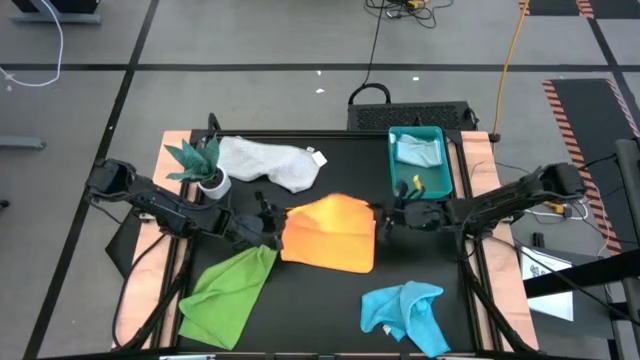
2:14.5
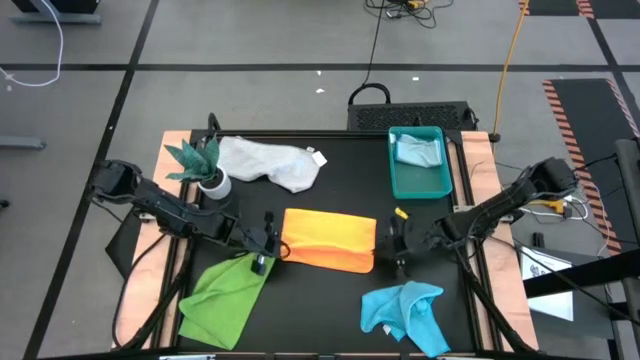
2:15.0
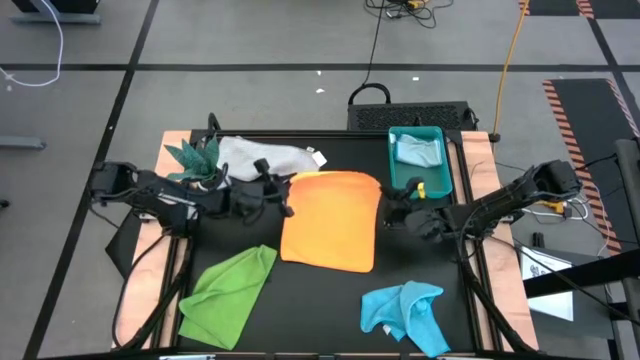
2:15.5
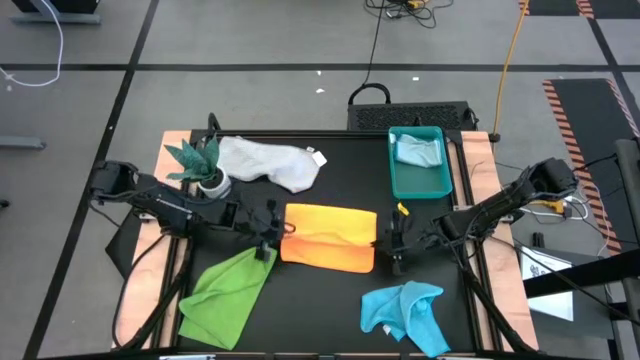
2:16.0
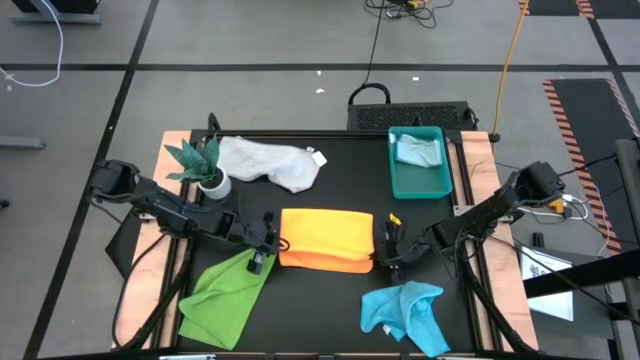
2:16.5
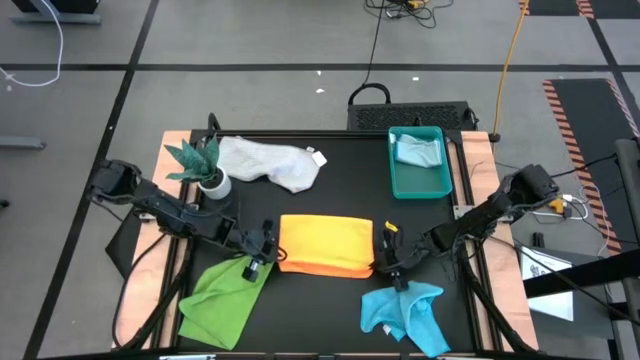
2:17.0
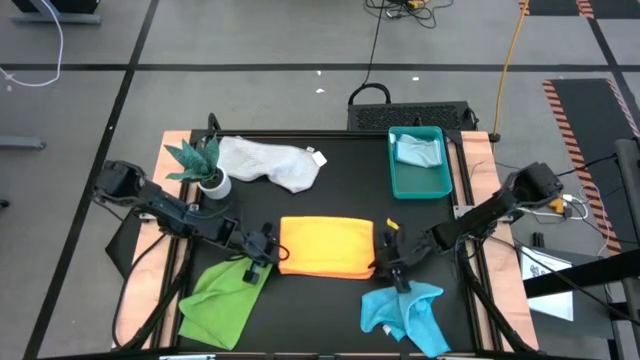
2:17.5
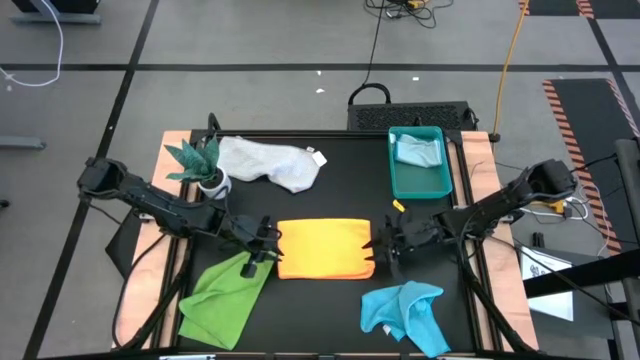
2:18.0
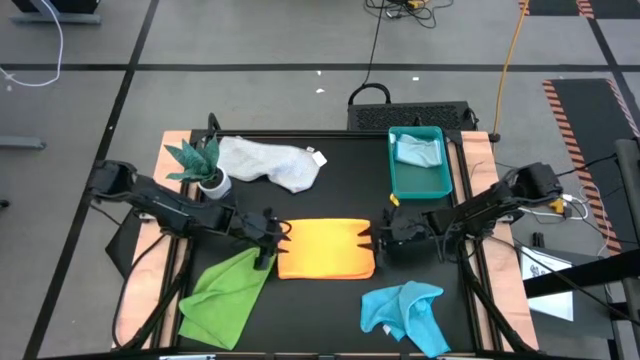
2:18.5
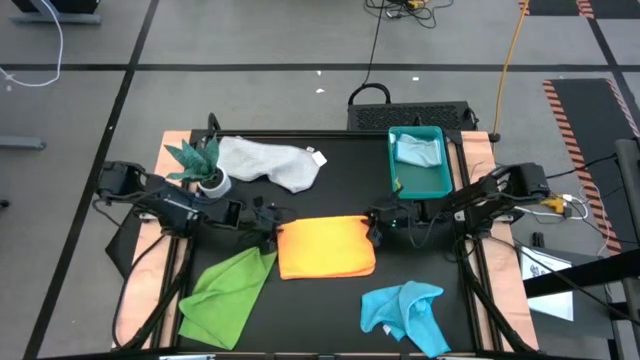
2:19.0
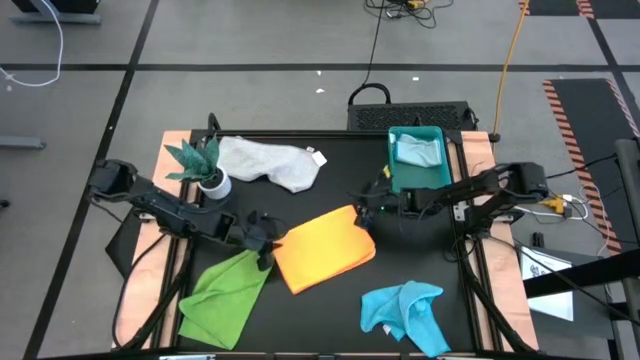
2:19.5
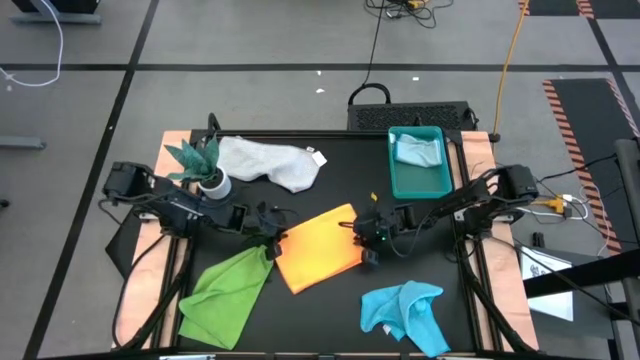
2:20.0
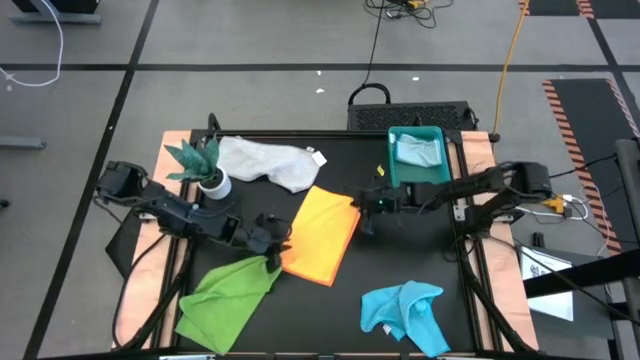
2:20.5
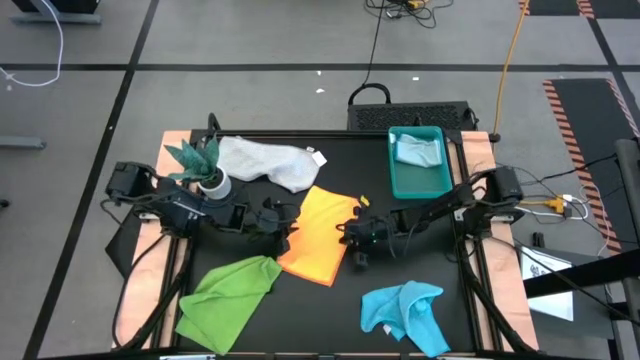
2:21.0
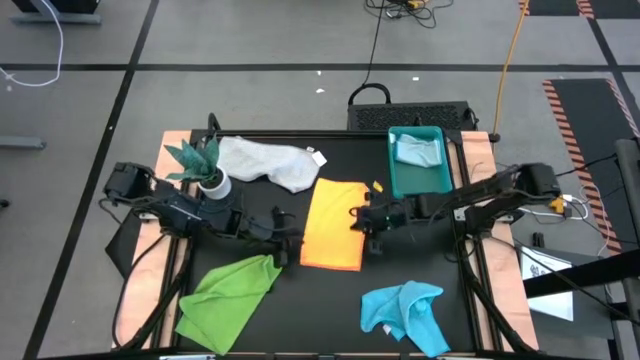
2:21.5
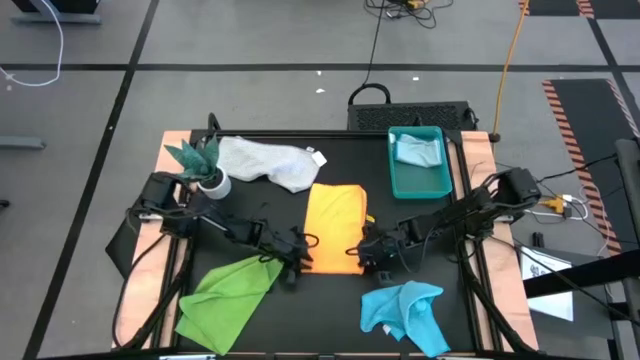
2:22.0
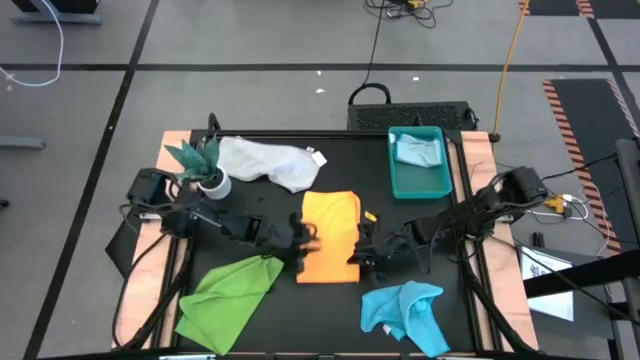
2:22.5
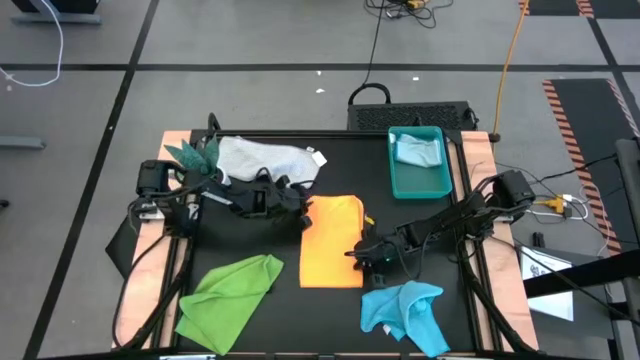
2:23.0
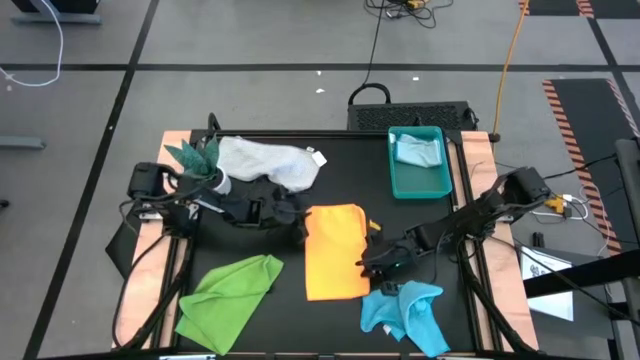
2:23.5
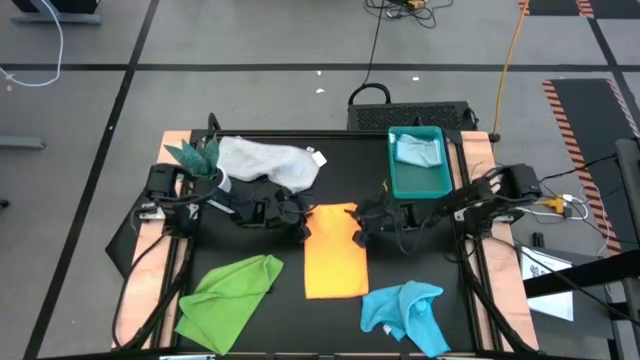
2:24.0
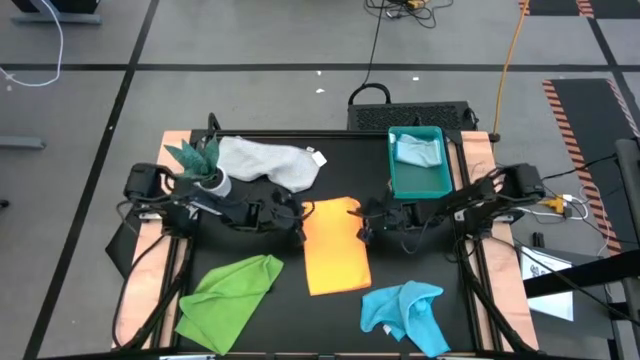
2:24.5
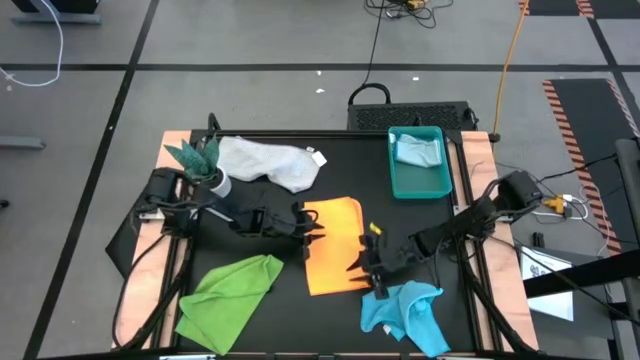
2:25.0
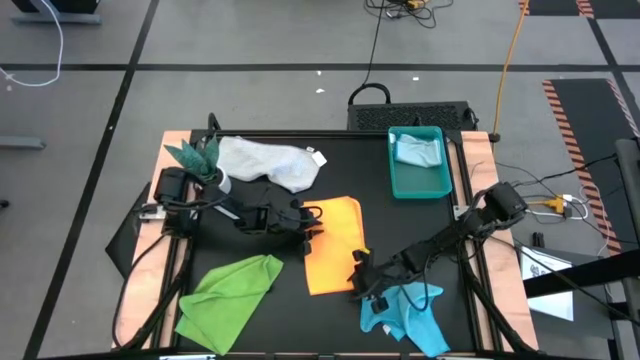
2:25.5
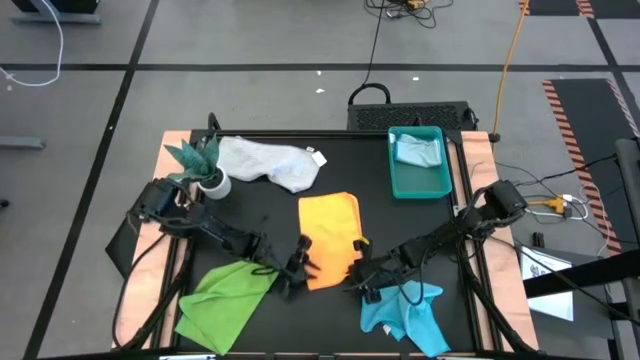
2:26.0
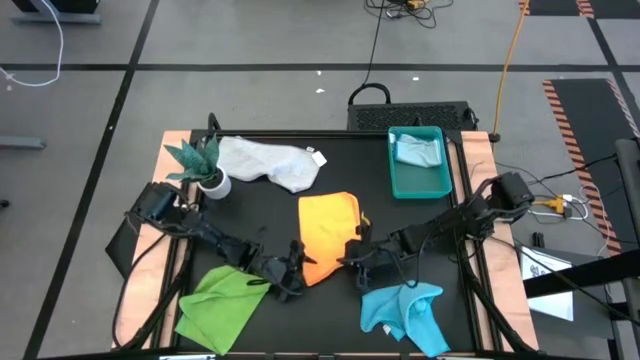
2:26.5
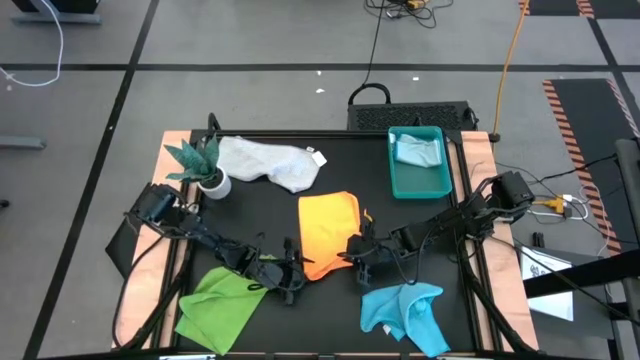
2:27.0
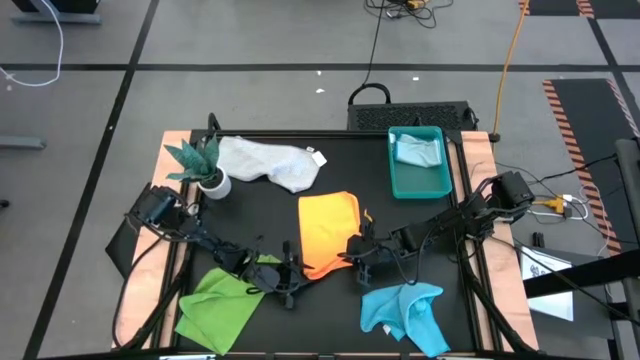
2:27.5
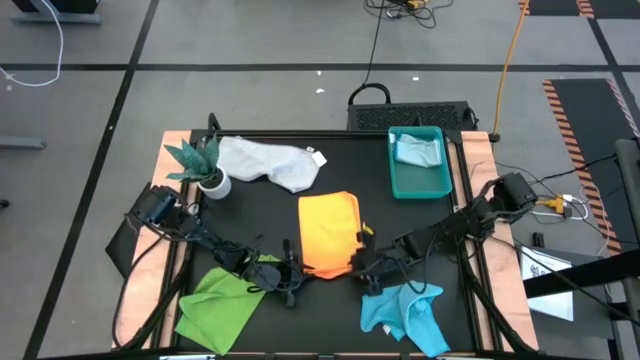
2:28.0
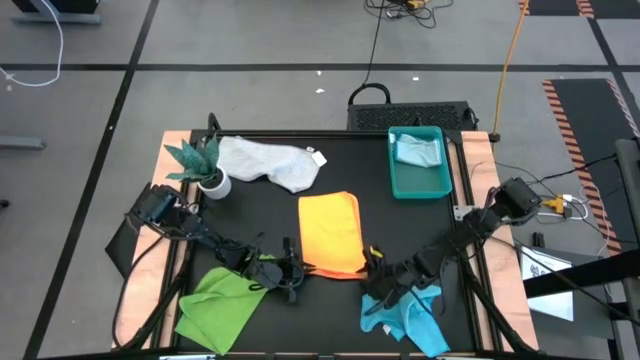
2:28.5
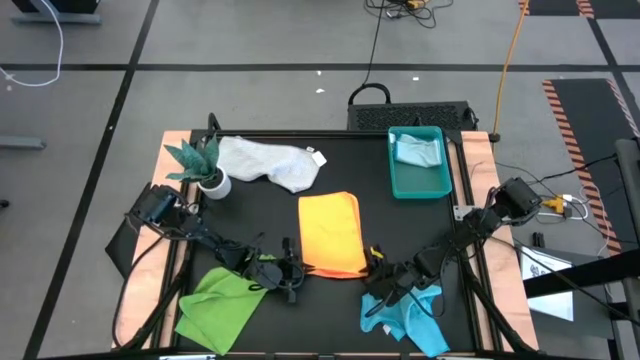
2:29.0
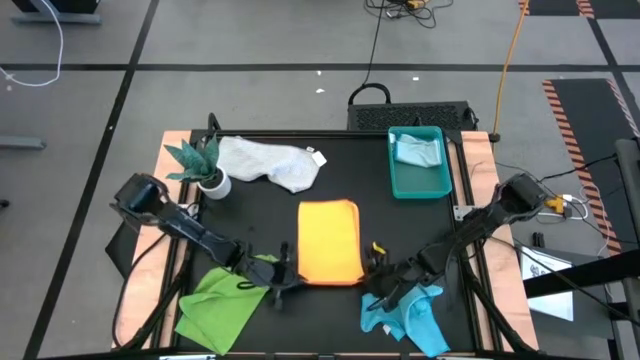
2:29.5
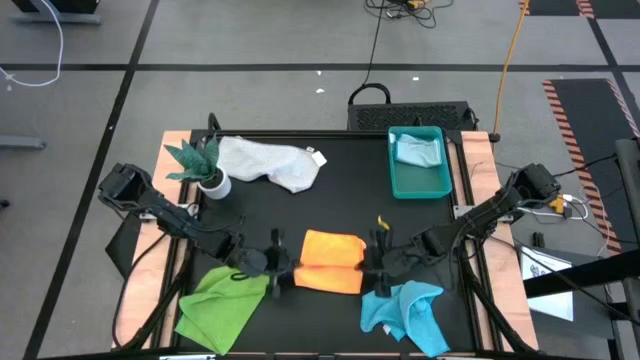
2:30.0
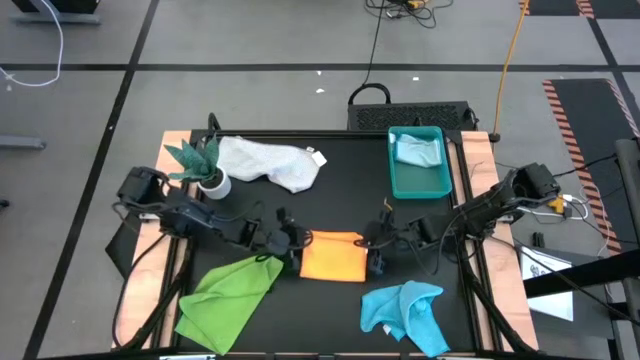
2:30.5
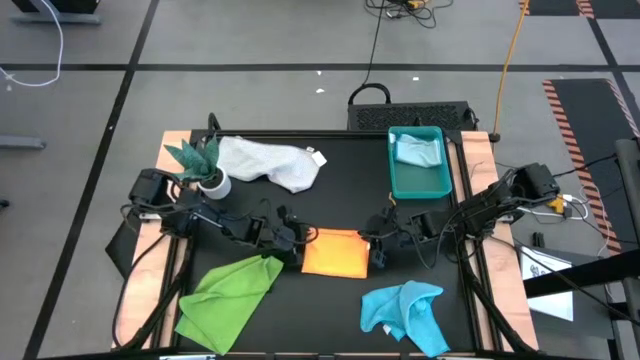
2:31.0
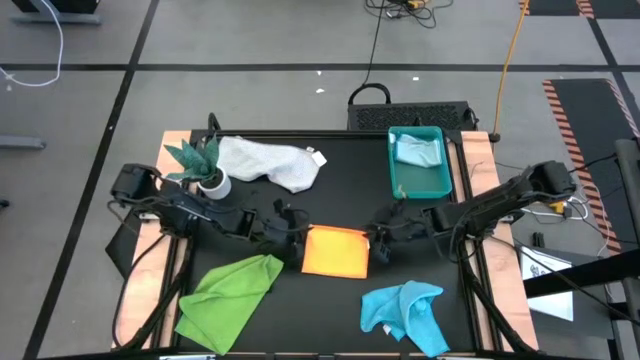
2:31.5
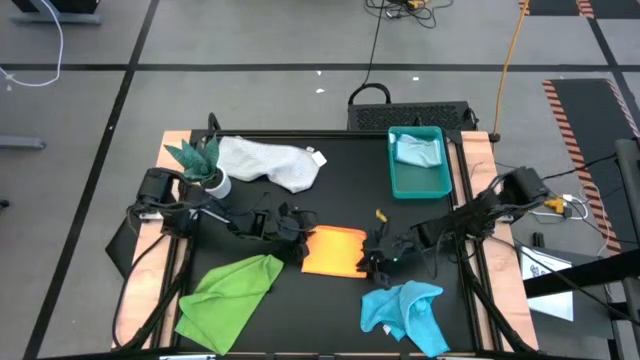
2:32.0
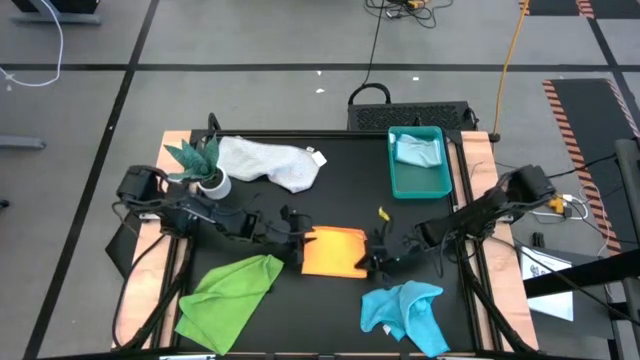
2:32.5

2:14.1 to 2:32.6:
Task: Fold microfiber towels
Fold the orange microfiber cloth

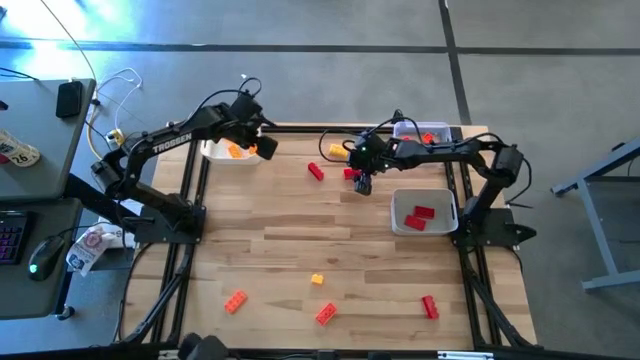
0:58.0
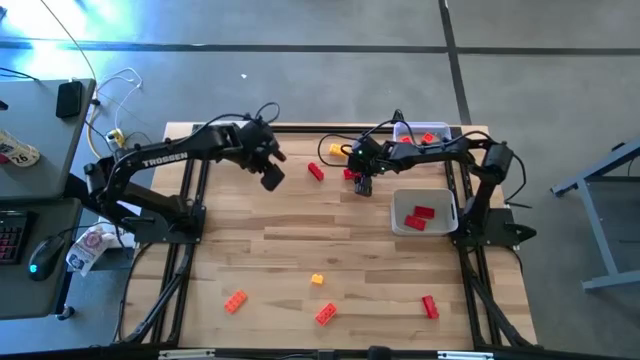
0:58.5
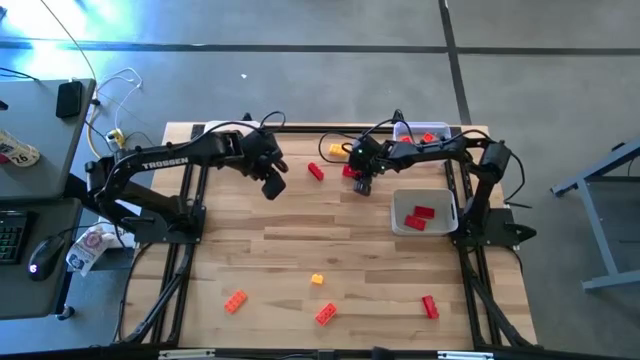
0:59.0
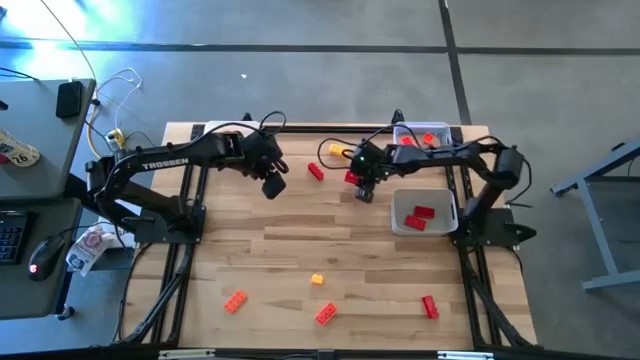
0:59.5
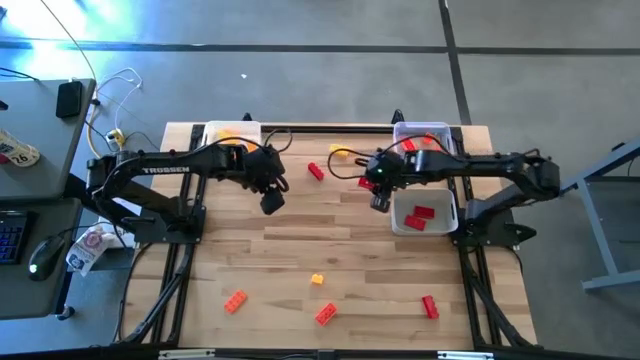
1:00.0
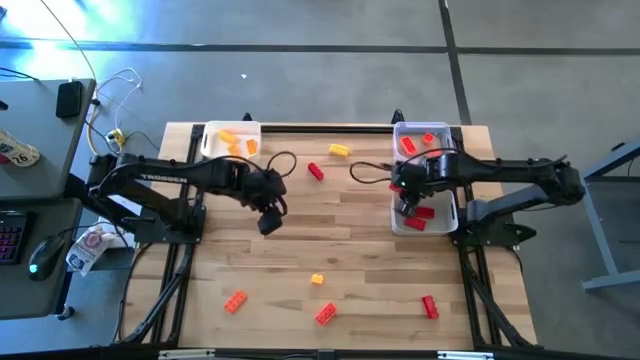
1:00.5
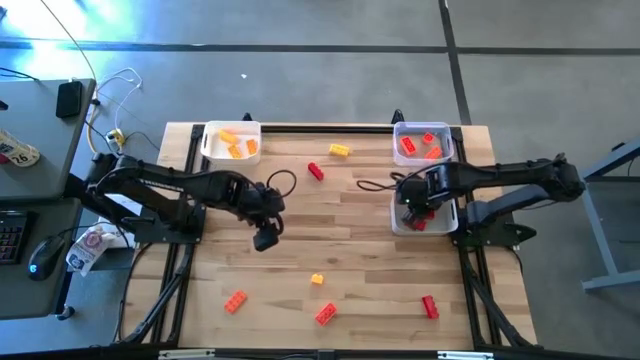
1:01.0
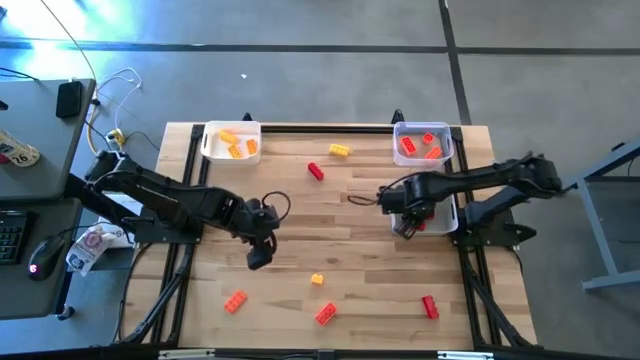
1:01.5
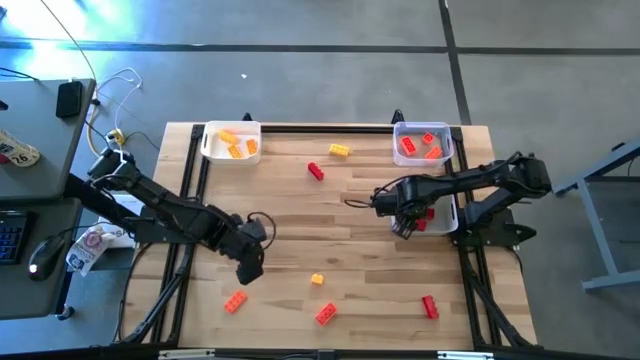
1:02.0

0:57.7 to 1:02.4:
Task: Sort & place blocks by color
Put the red game piece into the gray bin
